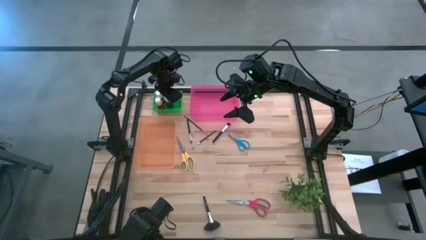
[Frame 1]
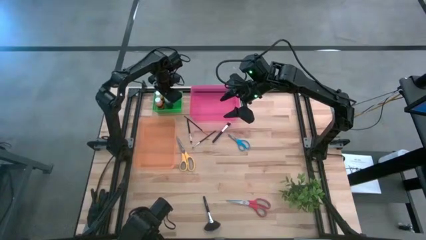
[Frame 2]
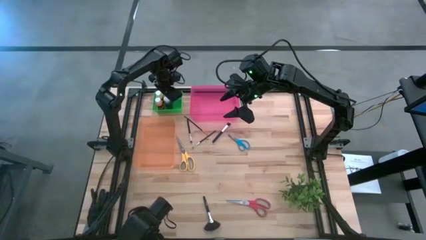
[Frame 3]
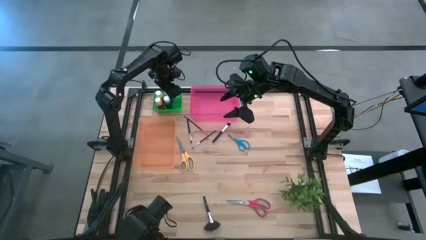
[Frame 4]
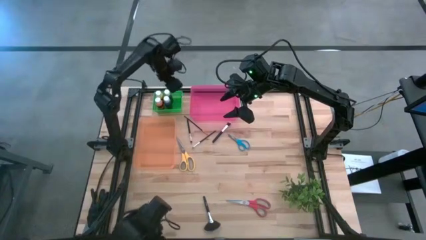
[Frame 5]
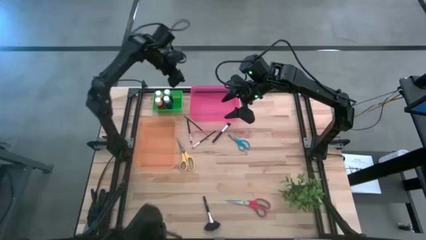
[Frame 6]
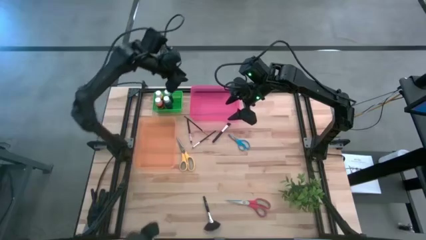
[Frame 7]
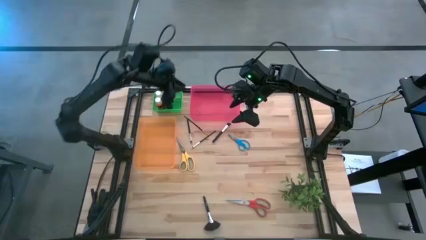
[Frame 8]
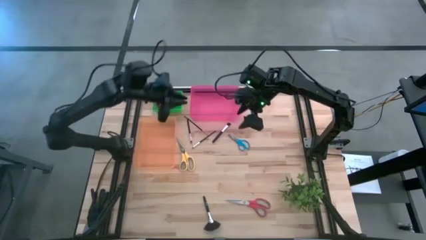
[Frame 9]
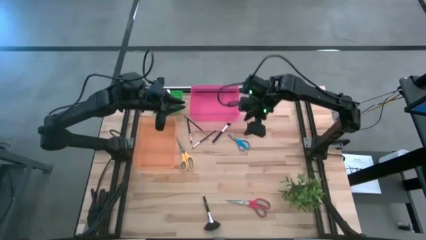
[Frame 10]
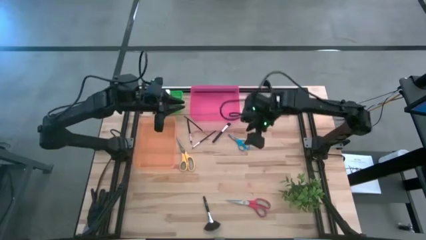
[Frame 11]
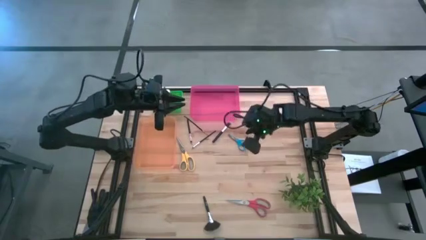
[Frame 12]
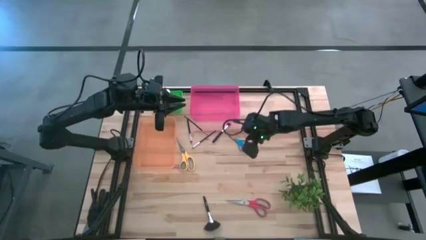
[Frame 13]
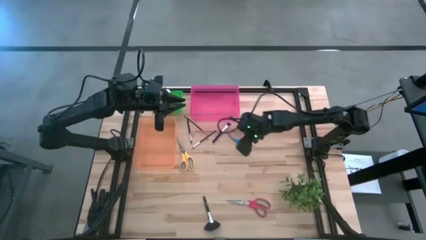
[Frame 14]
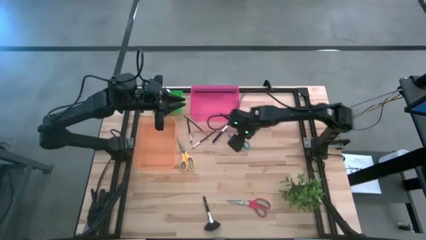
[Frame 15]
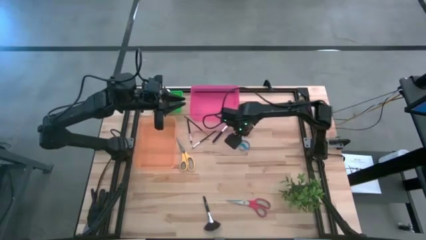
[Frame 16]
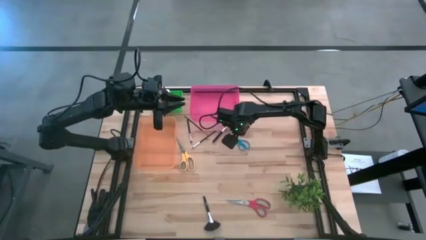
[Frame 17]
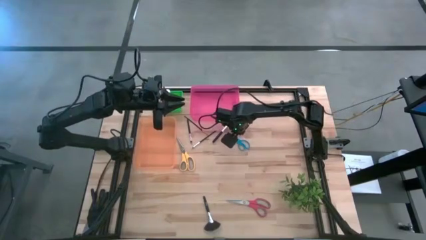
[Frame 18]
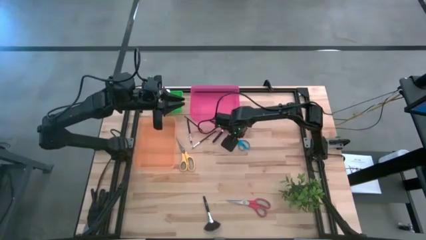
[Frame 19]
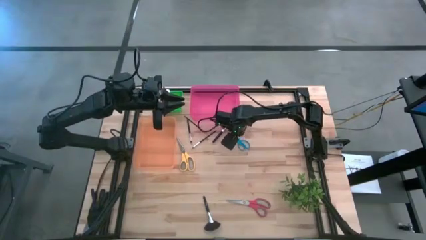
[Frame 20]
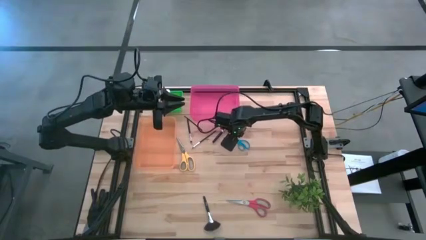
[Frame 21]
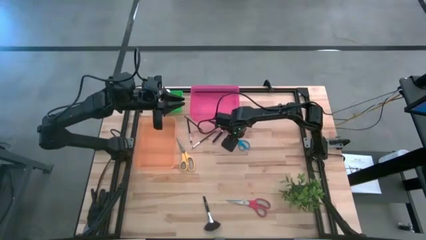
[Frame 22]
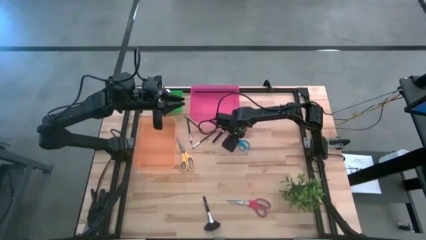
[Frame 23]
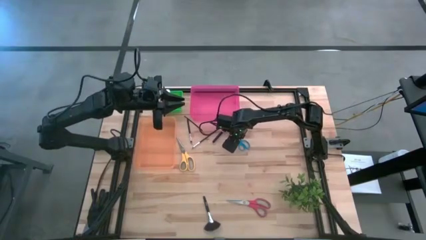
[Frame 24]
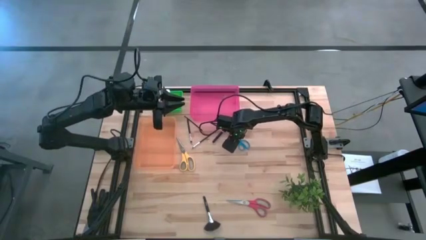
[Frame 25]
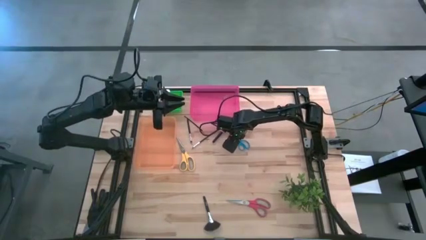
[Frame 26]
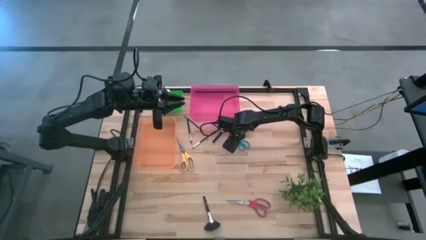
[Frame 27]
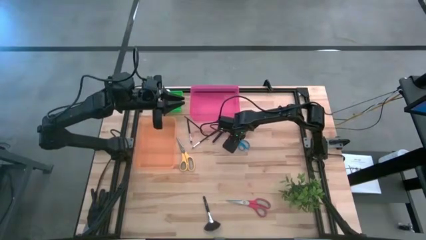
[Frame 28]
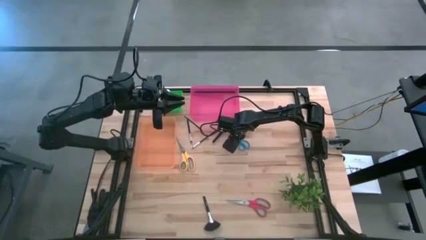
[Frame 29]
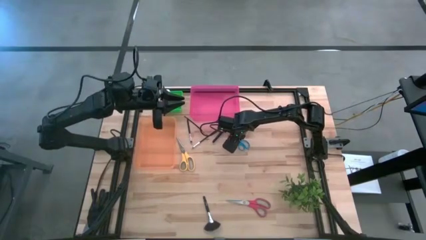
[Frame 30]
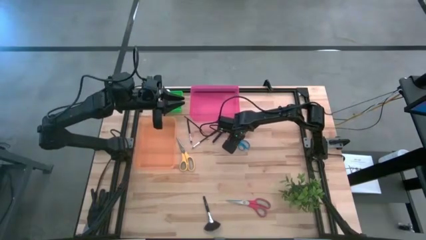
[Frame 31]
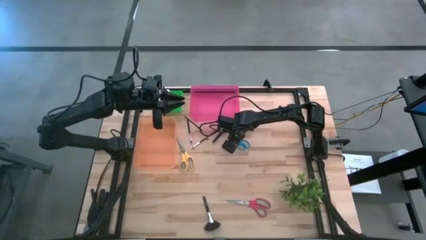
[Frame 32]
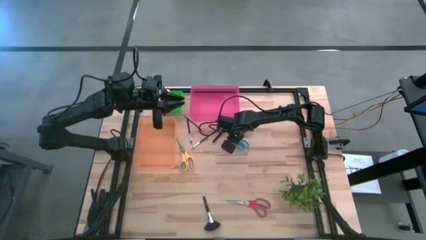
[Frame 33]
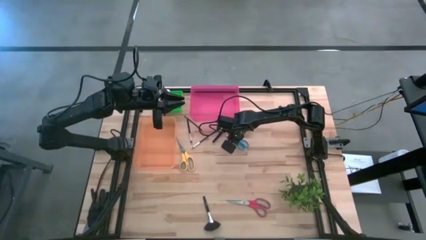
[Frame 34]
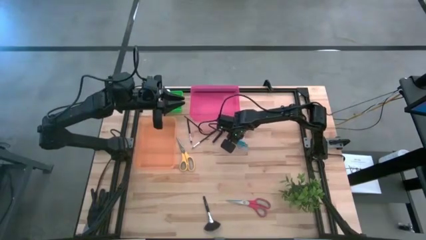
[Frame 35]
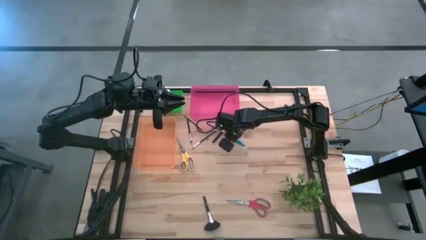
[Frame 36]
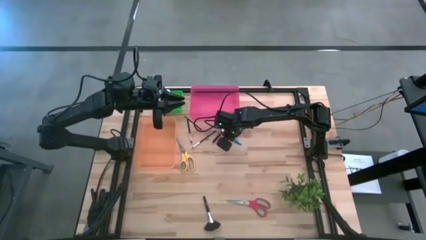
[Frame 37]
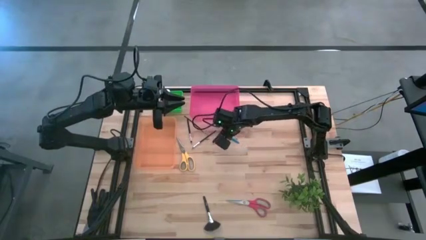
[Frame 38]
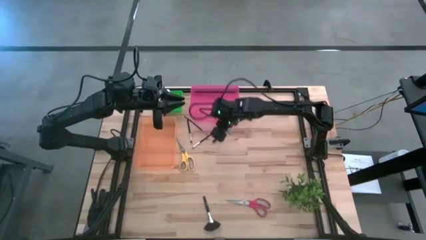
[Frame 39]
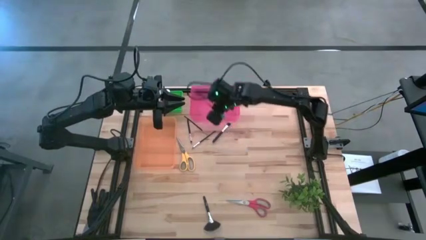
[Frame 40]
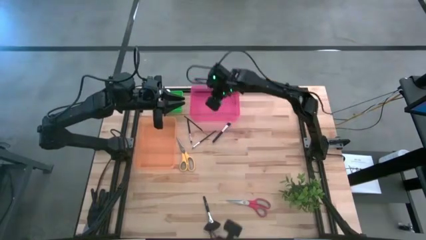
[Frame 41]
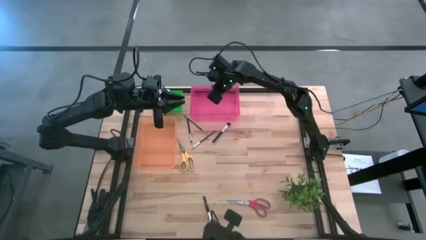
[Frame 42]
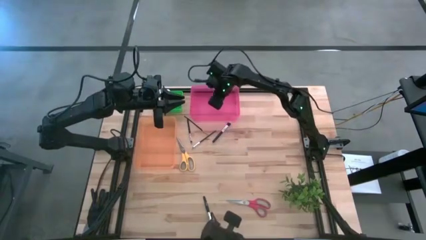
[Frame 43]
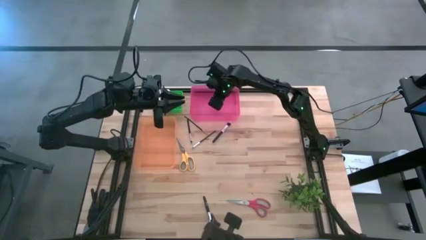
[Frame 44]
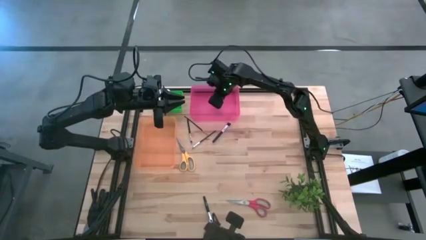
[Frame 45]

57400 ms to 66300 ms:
Task: Pick & Place Paint Supplies
Put the blue scissors into the red bin

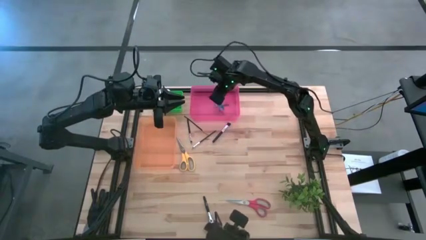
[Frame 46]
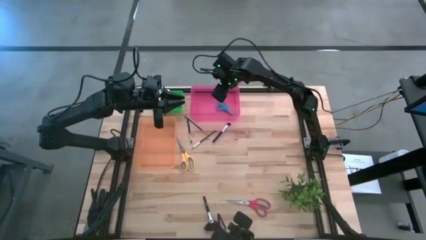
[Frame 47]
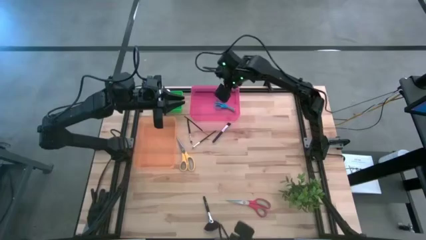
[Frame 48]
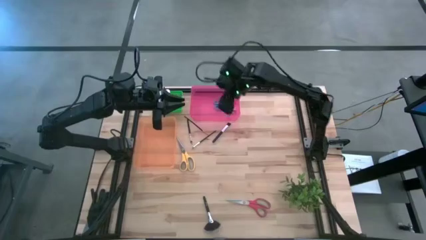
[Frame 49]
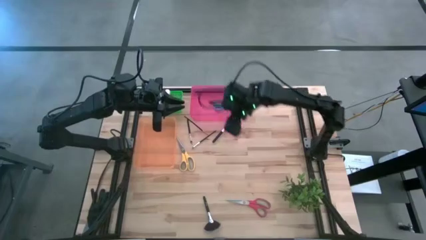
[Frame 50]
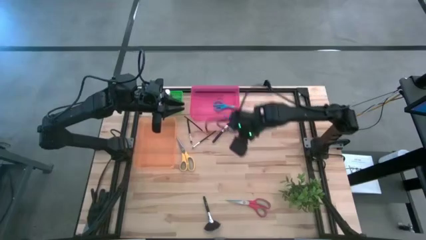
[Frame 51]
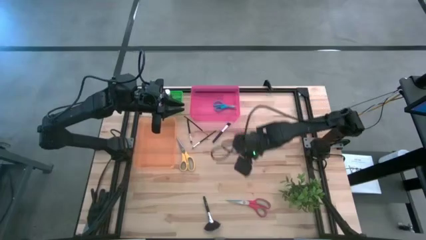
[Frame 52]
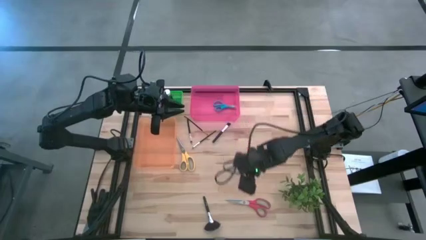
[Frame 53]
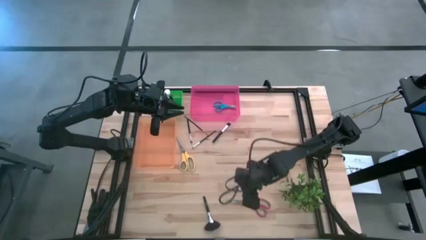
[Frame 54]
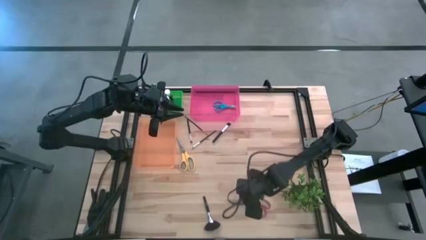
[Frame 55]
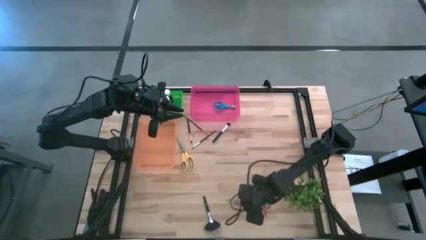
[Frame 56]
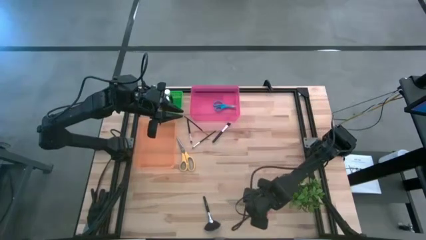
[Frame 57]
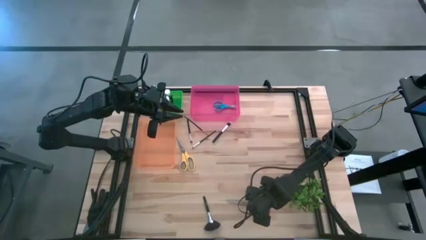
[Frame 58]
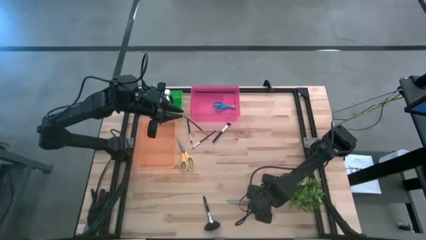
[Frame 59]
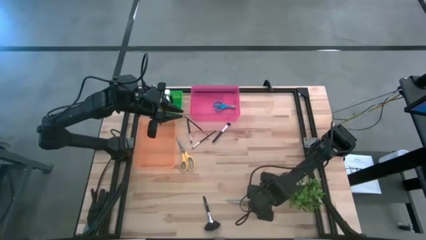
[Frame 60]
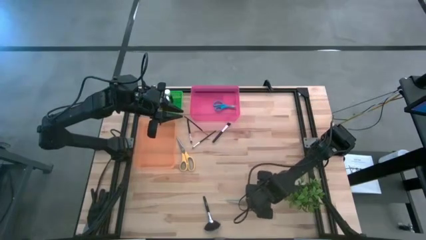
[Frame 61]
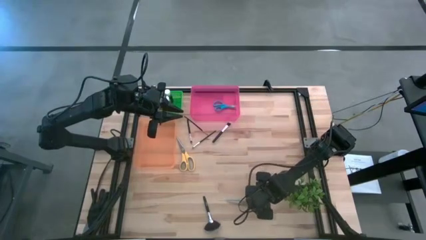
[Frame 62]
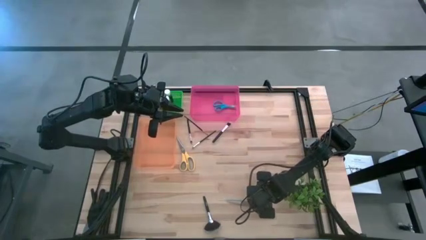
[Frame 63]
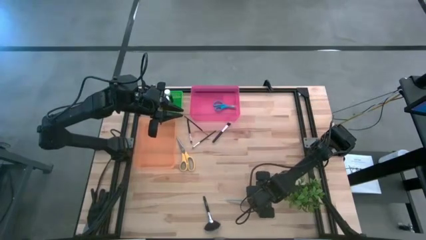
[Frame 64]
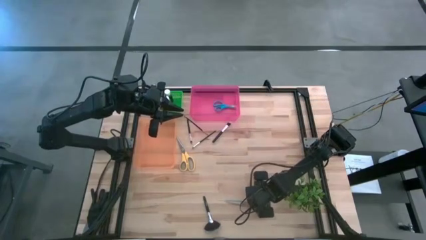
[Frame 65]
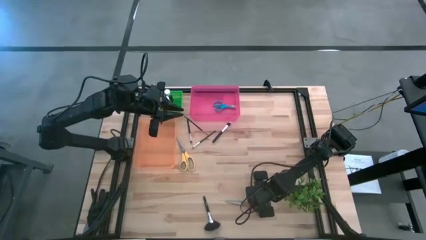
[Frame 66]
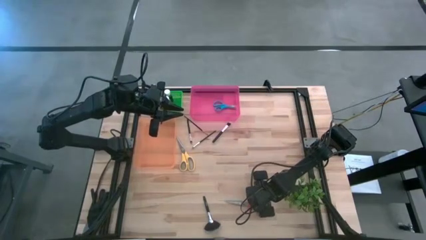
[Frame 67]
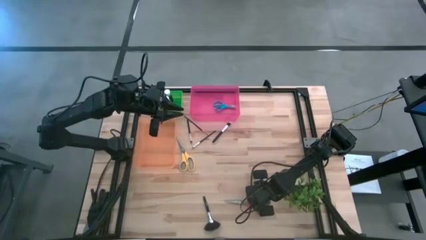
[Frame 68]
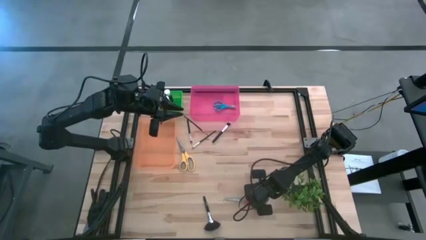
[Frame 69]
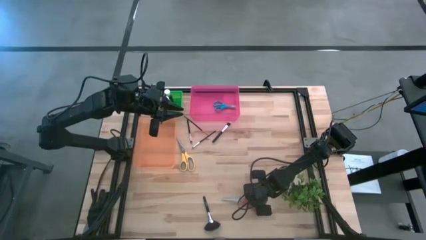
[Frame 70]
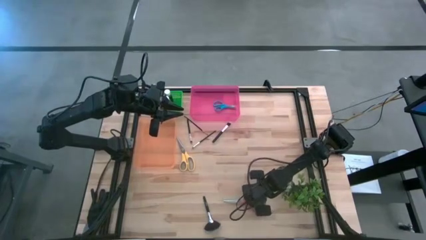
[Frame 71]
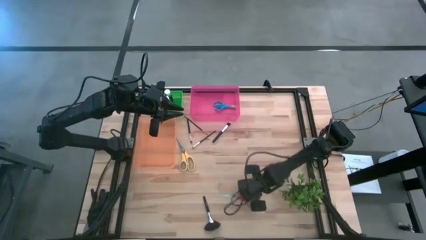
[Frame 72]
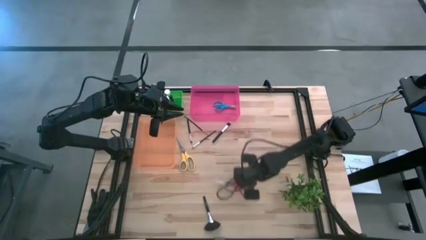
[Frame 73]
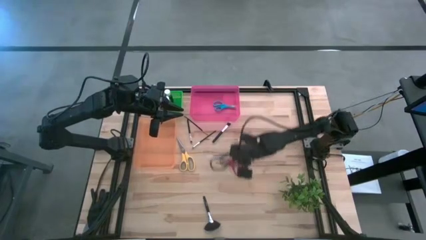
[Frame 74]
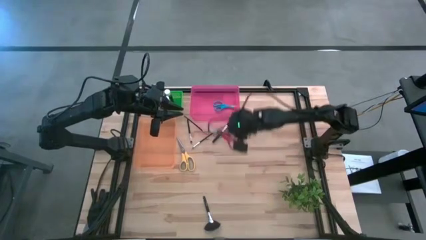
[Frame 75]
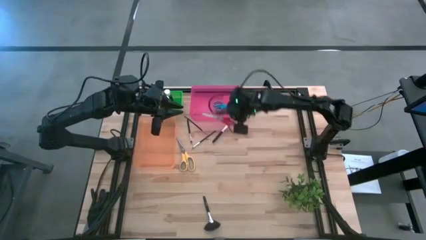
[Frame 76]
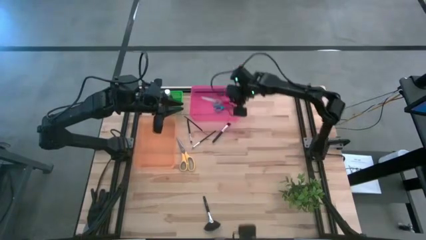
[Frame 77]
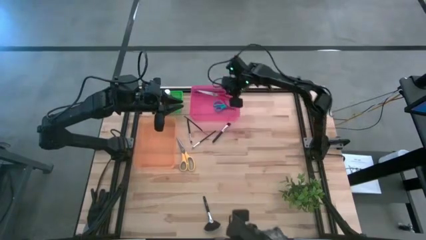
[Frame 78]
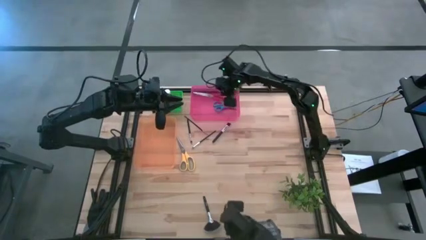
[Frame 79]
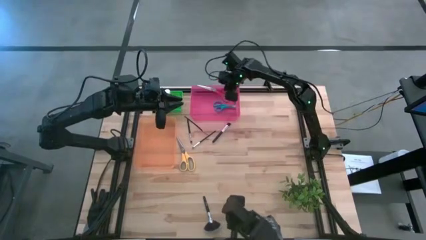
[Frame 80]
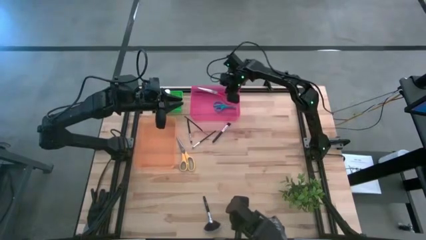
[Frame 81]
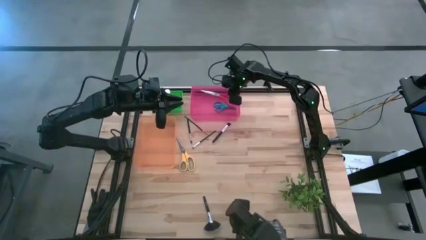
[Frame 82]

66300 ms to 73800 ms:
Put the red scissors into the red bin
